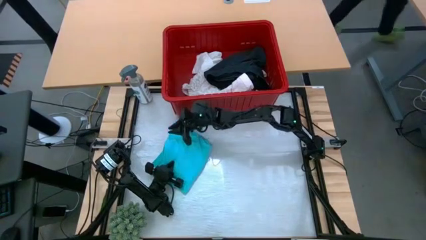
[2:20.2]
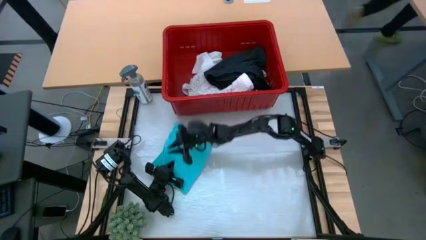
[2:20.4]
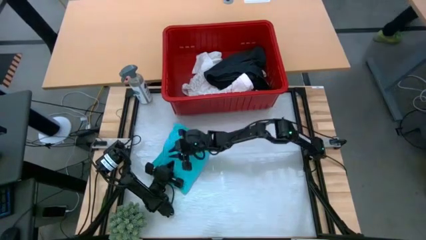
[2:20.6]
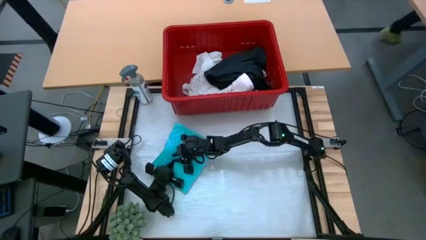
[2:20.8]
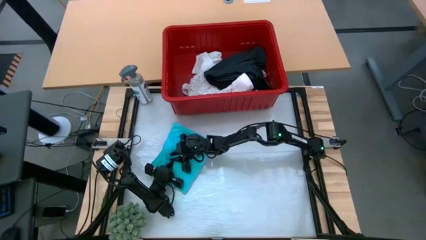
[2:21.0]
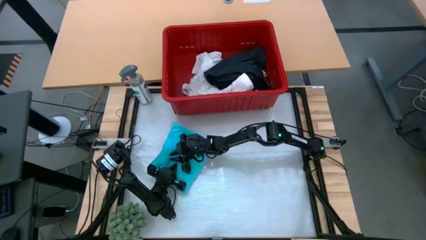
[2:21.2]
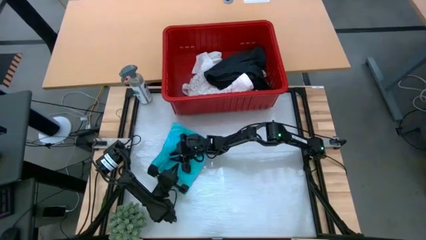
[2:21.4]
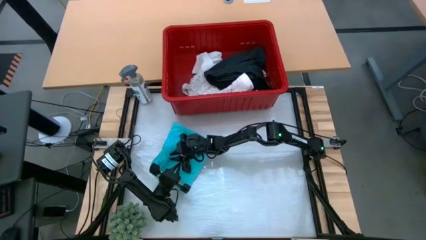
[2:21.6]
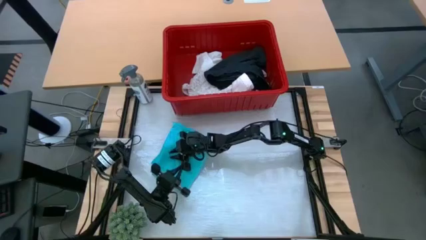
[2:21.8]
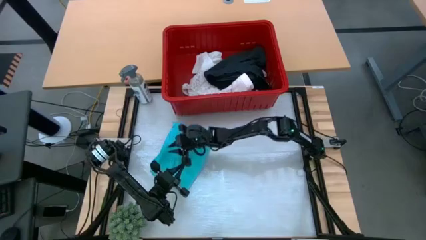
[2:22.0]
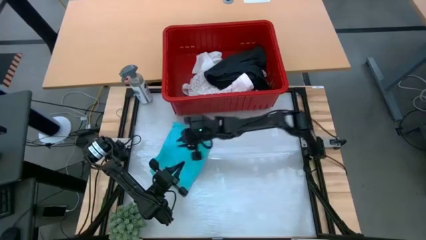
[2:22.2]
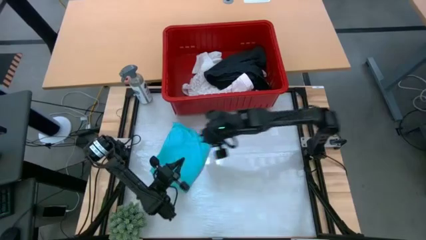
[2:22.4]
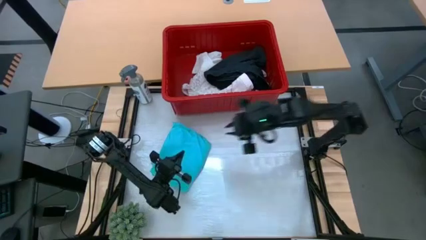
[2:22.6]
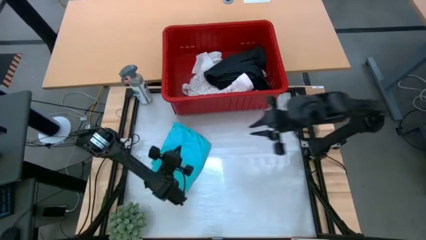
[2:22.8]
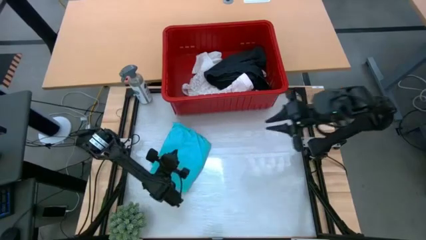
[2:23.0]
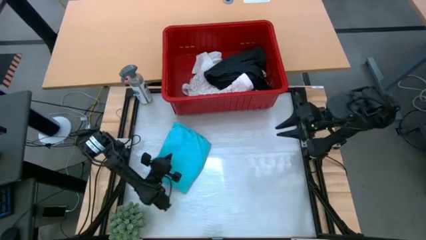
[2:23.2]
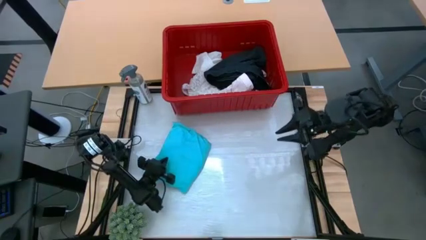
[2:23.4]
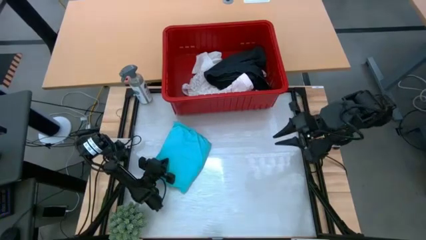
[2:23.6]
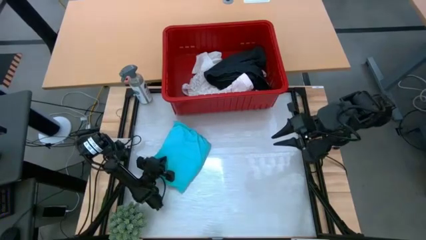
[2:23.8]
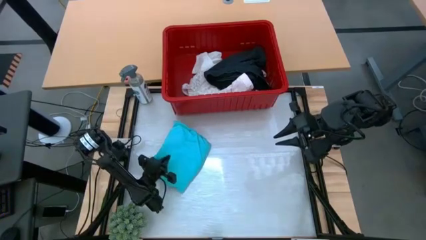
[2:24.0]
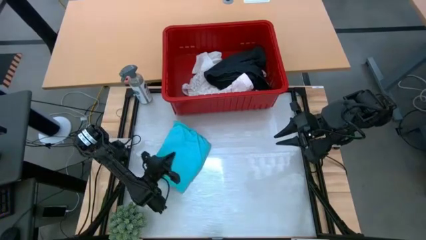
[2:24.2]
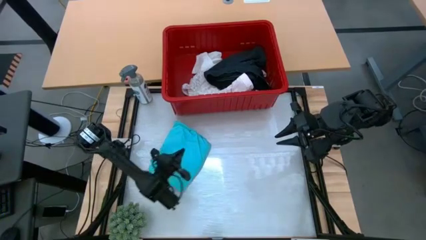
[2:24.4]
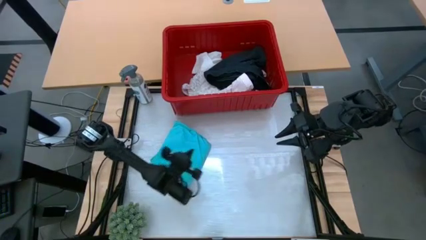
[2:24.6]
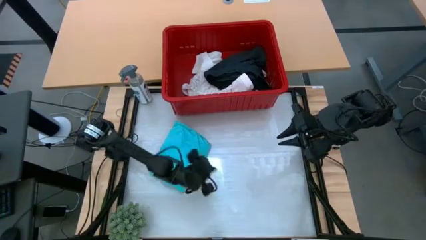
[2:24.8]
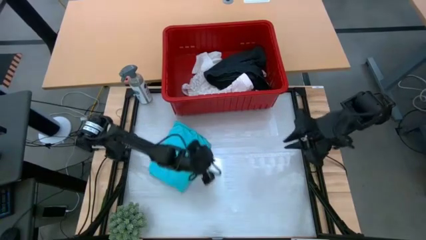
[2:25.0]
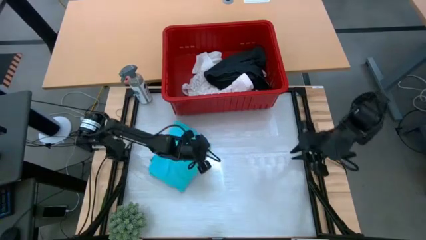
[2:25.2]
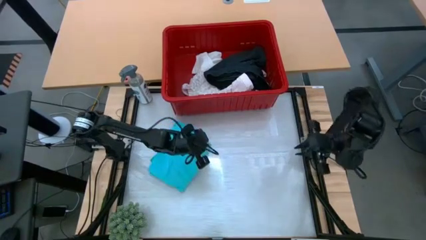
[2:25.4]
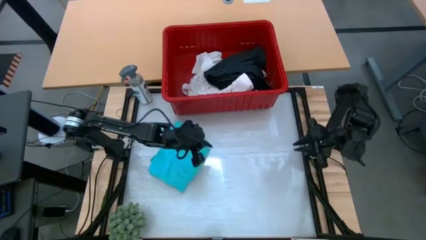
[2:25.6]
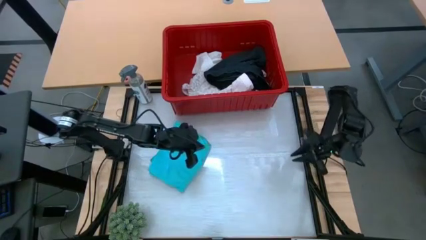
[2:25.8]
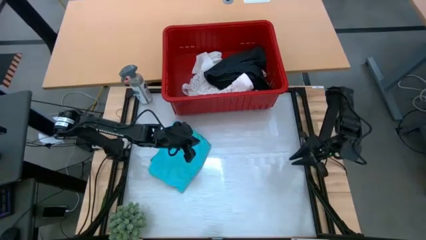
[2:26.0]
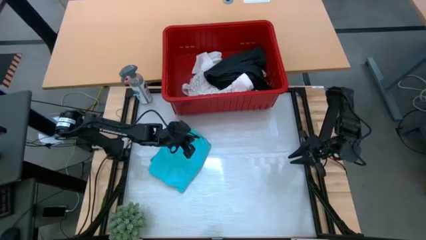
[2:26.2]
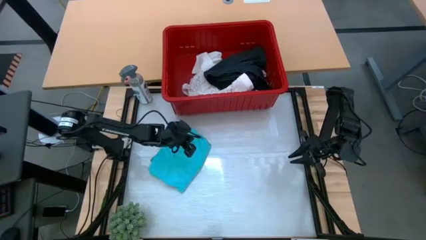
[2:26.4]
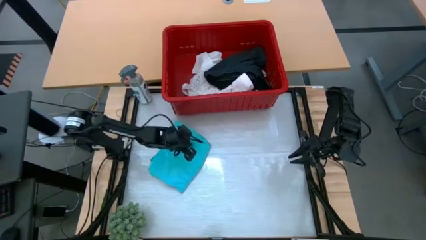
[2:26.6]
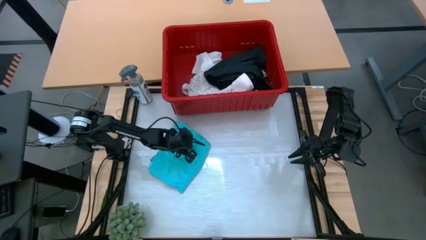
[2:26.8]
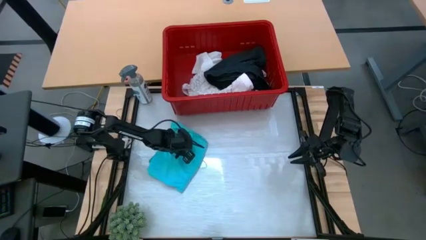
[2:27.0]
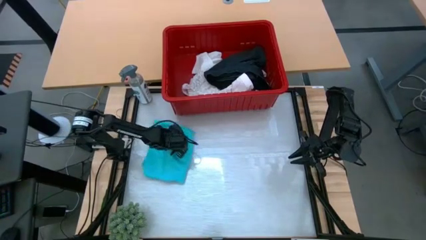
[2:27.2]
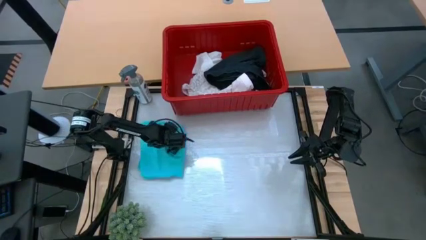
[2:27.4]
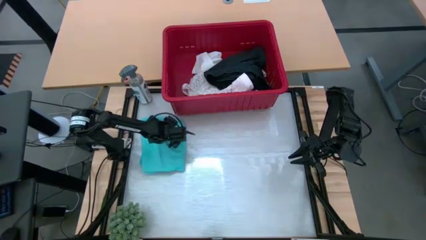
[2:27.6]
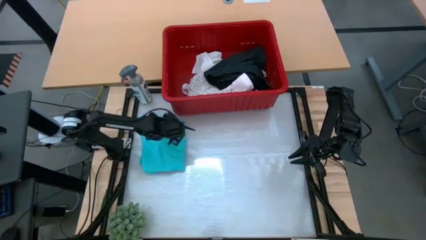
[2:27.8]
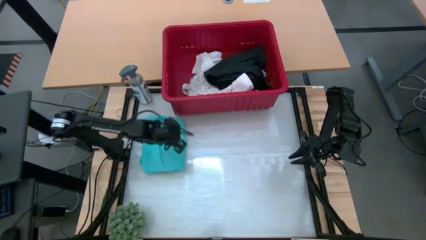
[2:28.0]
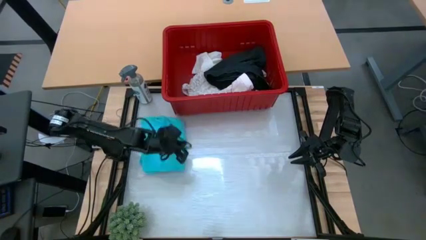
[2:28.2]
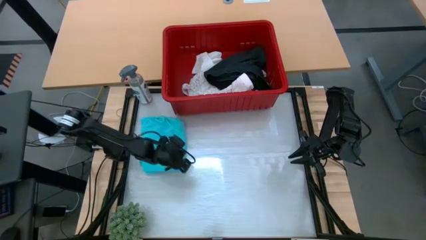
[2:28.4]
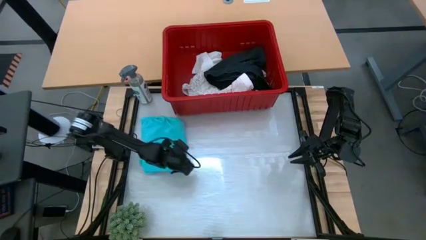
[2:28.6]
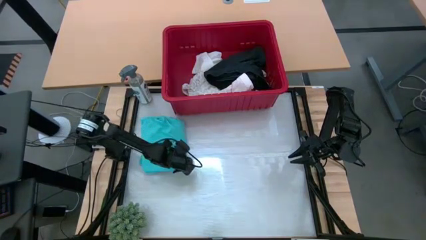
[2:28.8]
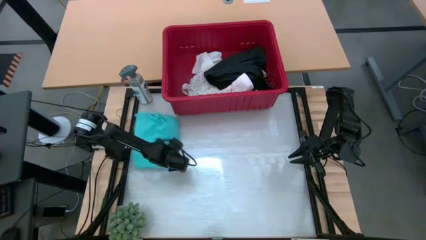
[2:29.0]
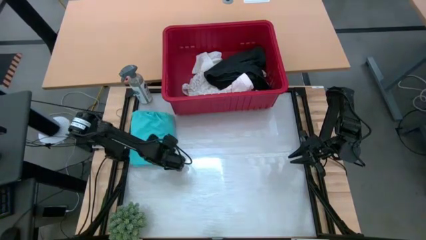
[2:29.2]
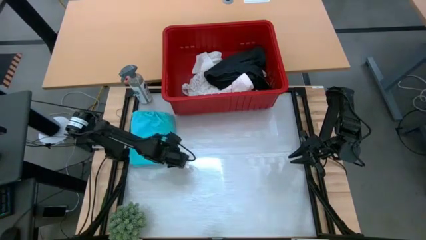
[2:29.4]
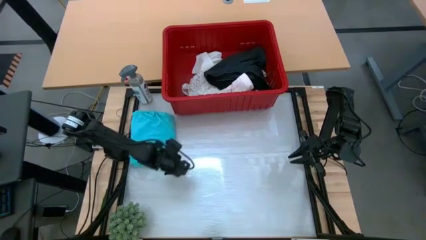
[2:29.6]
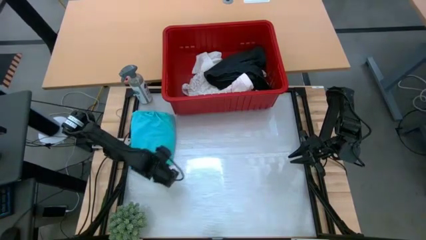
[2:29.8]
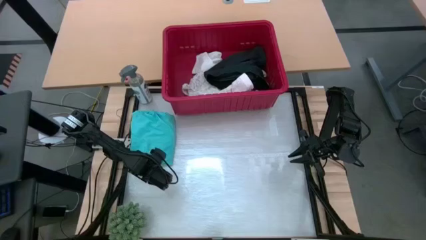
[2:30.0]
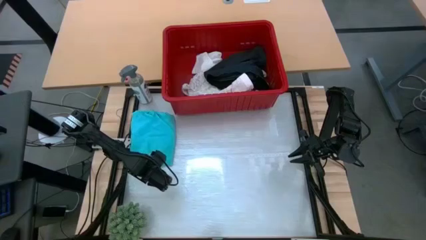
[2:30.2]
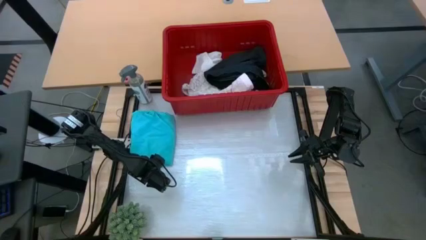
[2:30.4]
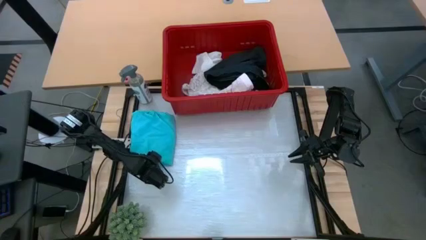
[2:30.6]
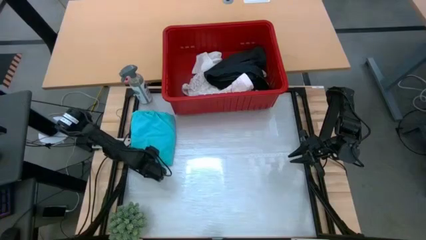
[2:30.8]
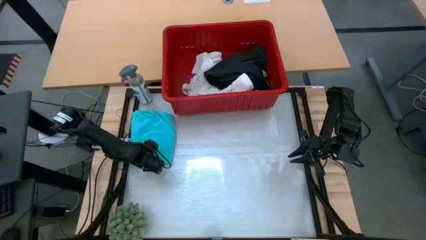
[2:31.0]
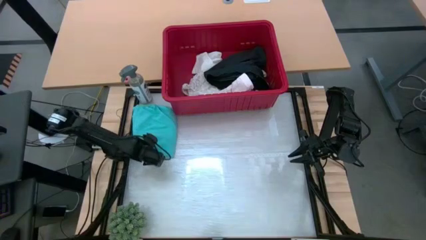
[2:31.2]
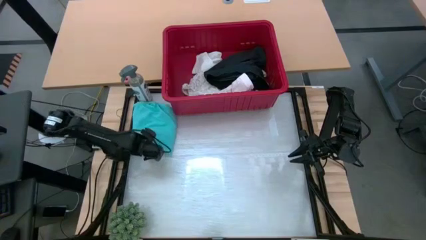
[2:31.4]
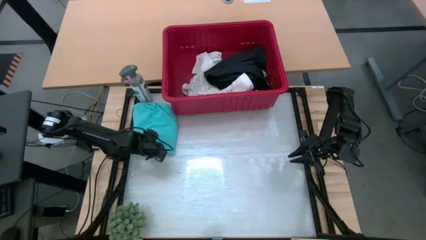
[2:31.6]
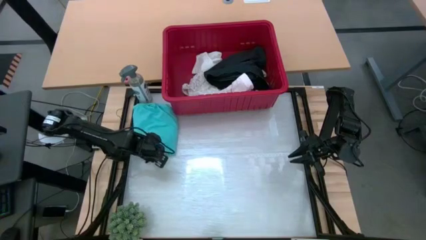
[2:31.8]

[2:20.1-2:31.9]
Task: Fold laundry
Fold the light blue shorts

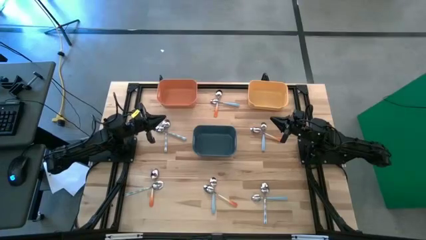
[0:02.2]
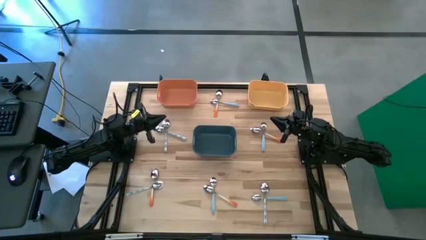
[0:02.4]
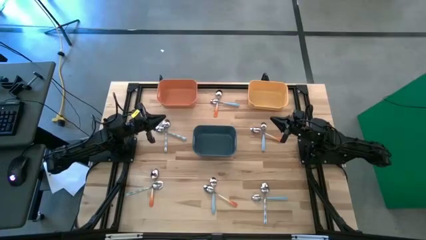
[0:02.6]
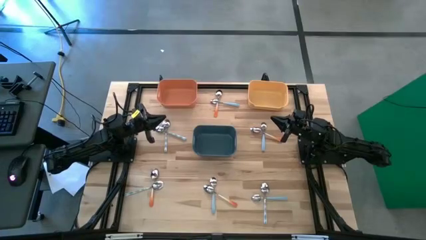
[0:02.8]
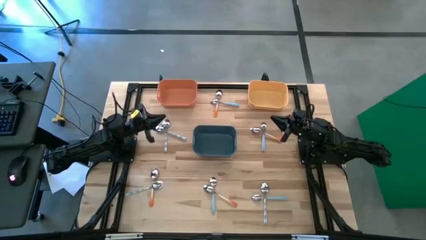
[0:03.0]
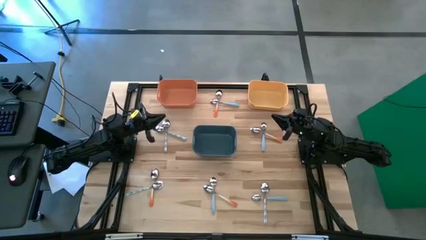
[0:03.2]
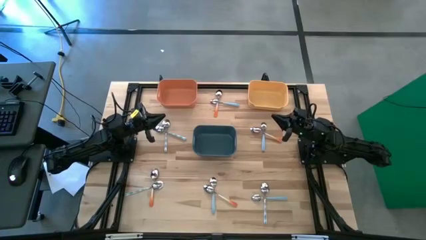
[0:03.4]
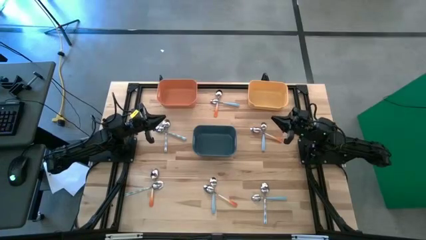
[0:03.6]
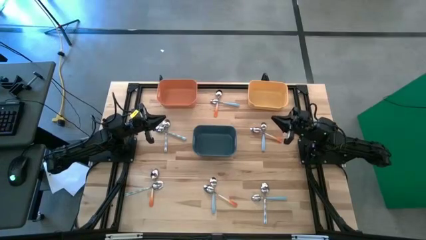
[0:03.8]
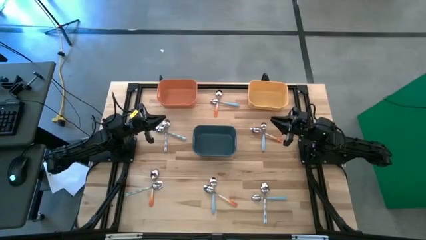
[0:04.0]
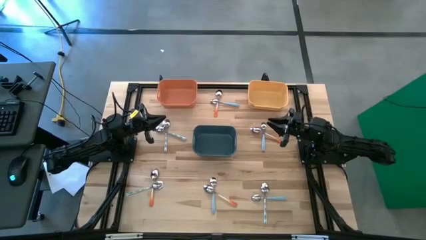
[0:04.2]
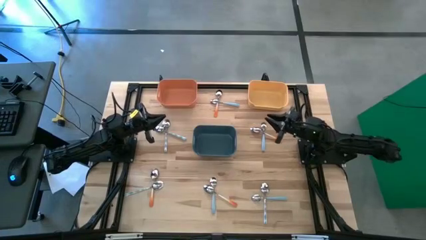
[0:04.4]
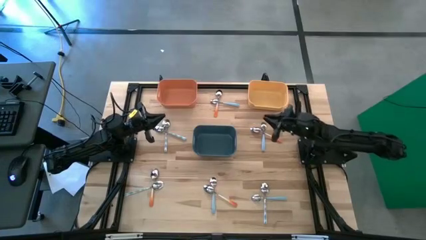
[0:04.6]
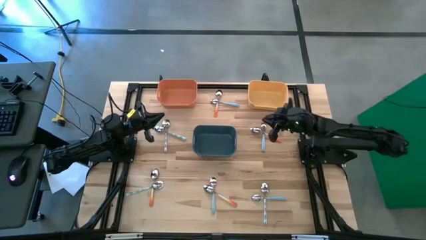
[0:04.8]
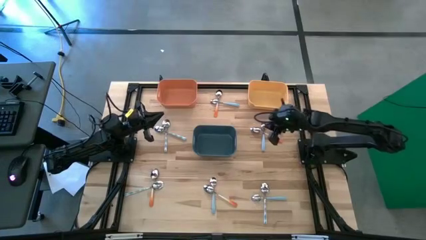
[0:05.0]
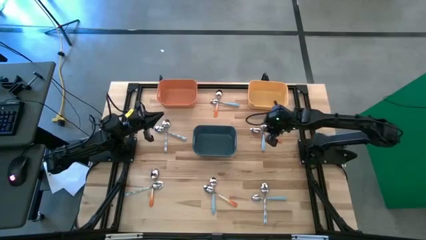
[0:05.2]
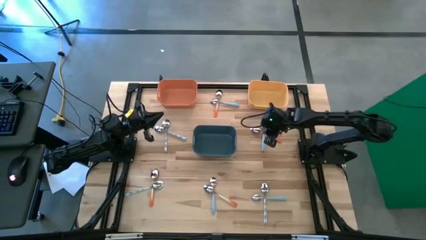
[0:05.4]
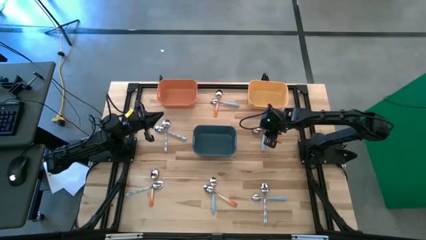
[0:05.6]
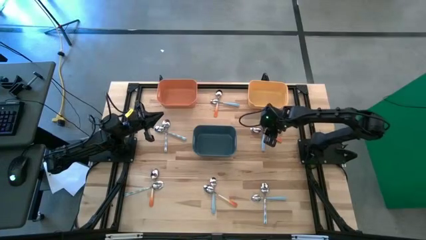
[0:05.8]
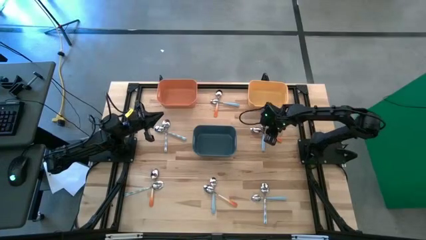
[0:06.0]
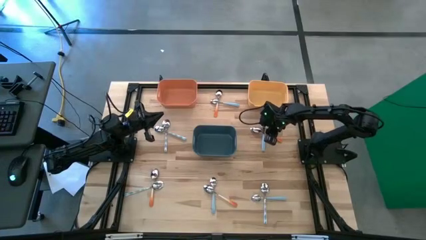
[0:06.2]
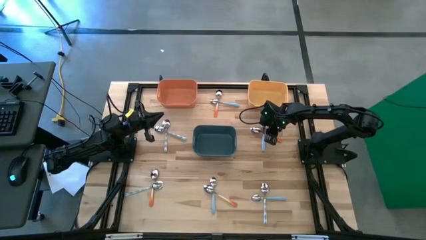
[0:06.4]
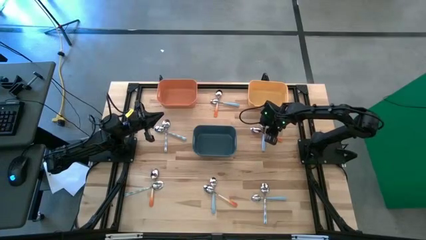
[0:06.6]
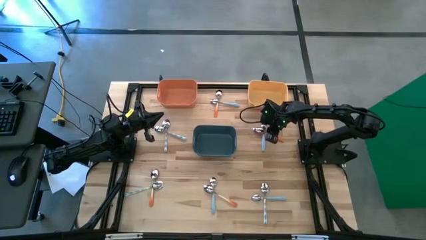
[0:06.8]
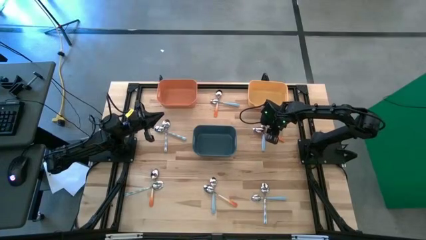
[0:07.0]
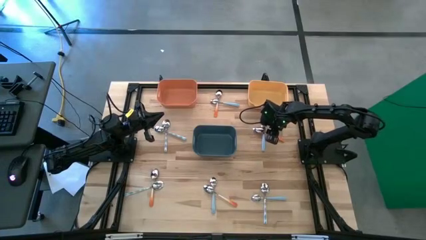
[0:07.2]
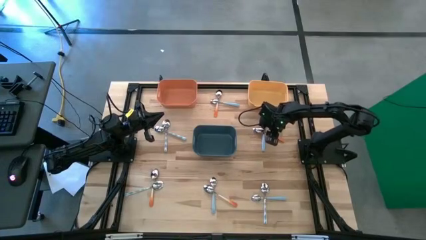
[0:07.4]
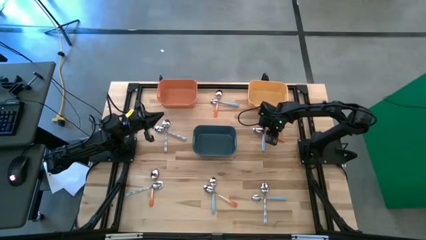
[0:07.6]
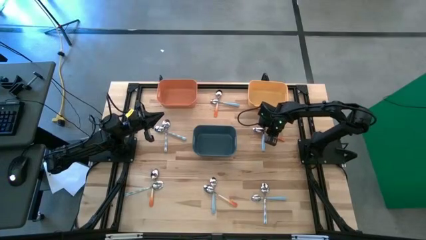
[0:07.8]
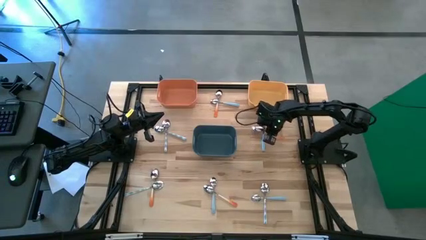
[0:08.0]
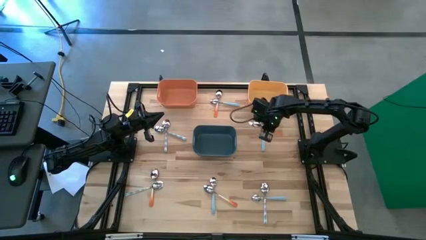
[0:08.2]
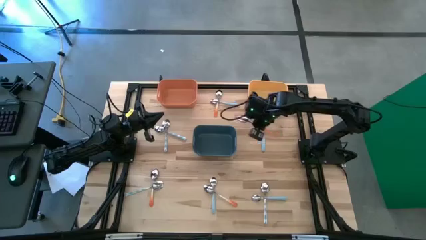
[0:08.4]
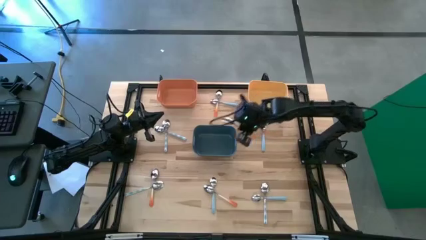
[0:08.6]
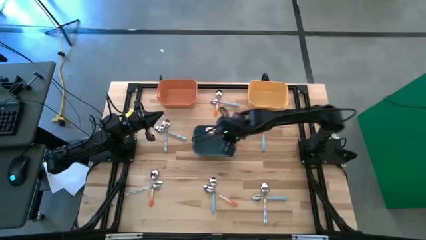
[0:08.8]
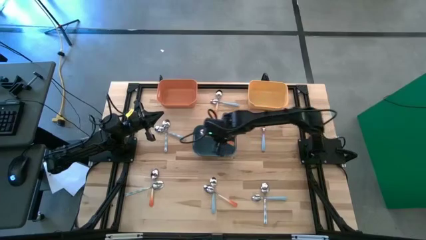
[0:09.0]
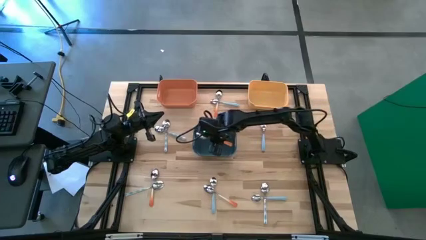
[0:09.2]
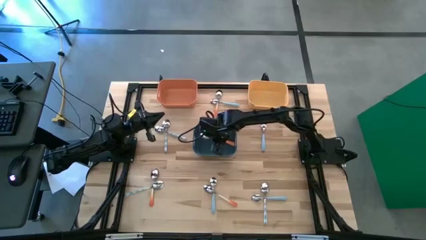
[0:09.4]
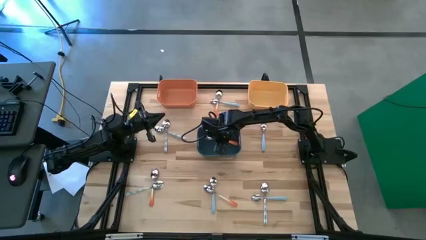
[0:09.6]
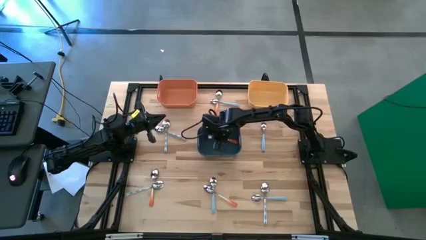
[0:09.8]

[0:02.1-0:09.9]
Task: Sort silverware by color (type)
Put the orange spoon into the blue bin
